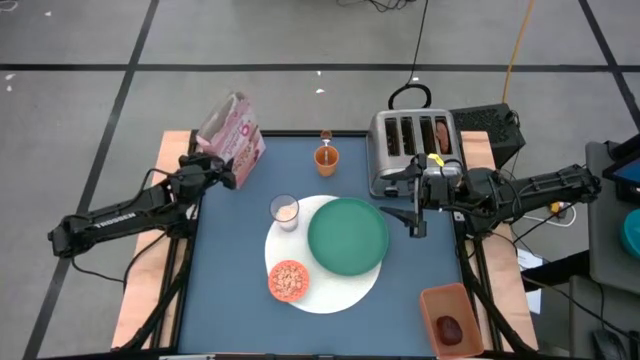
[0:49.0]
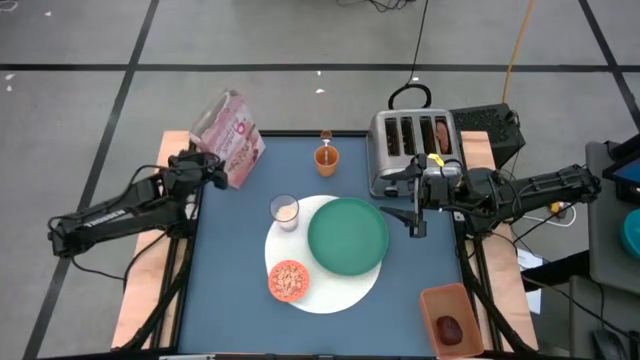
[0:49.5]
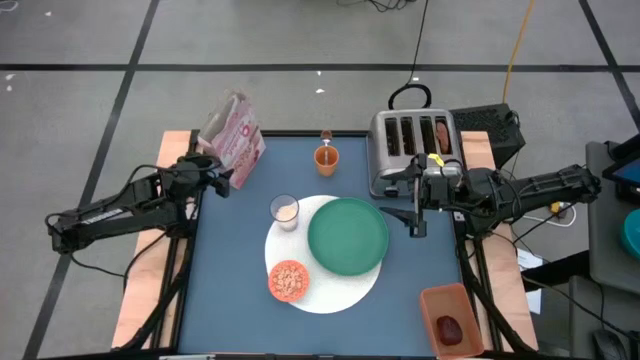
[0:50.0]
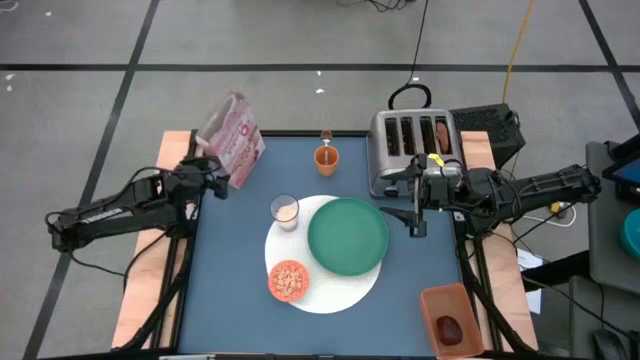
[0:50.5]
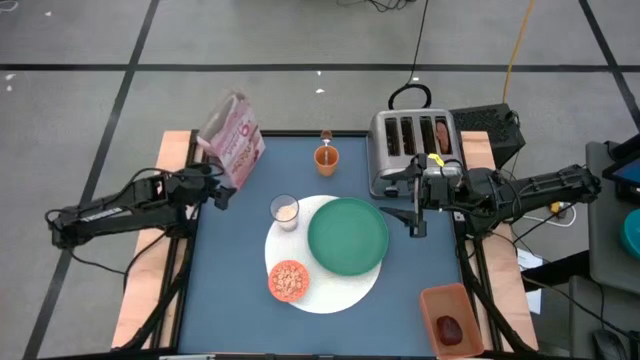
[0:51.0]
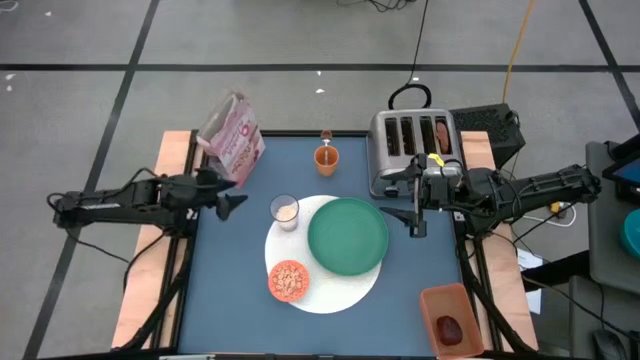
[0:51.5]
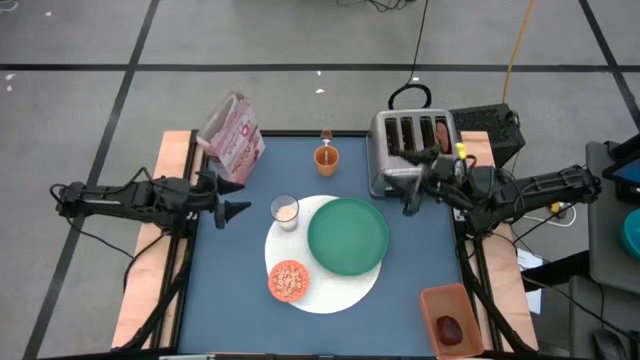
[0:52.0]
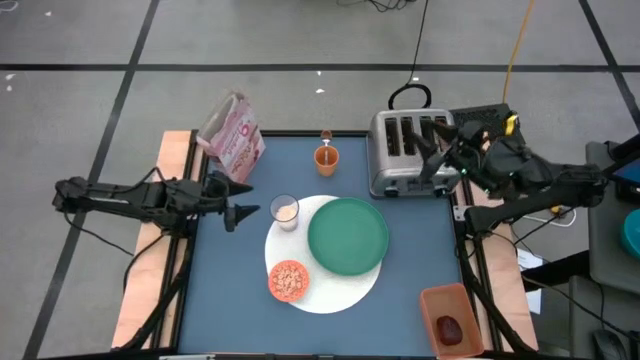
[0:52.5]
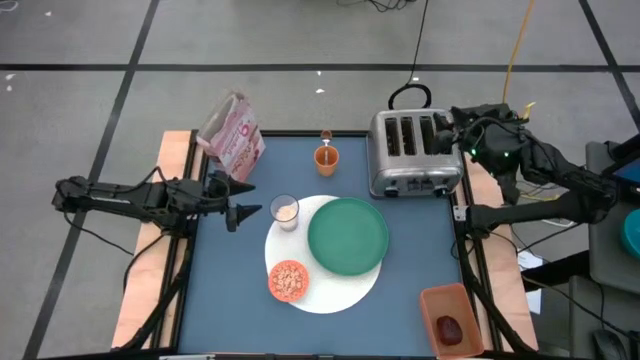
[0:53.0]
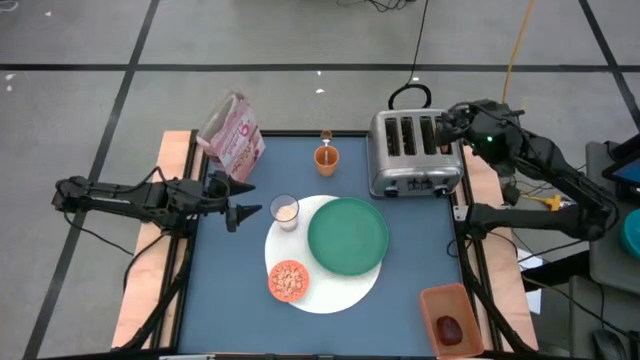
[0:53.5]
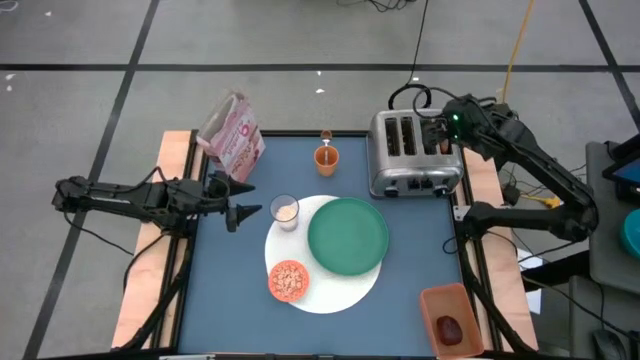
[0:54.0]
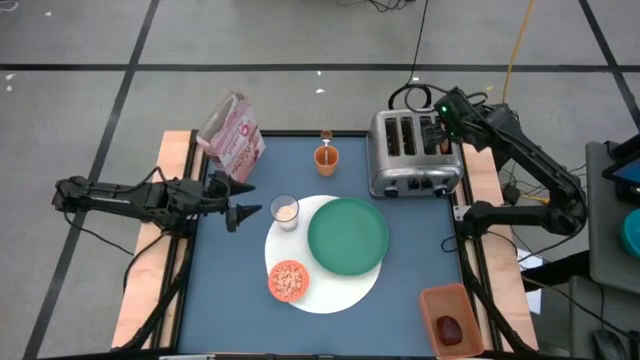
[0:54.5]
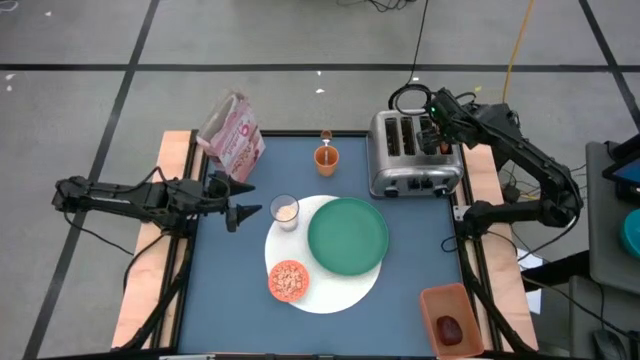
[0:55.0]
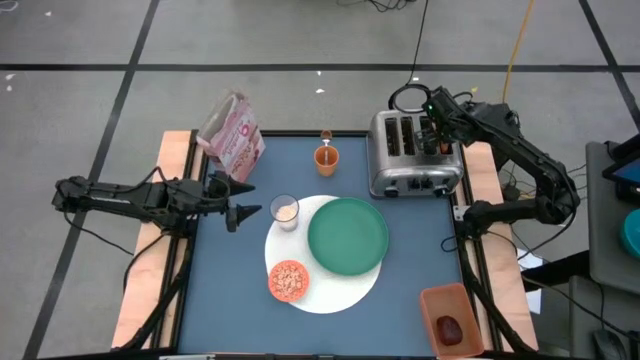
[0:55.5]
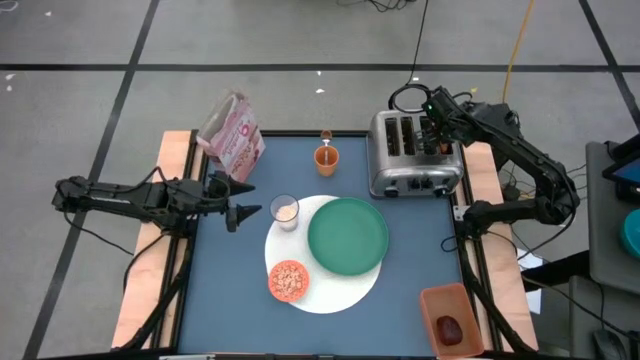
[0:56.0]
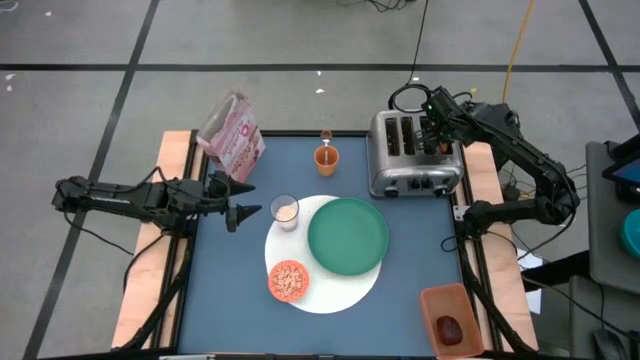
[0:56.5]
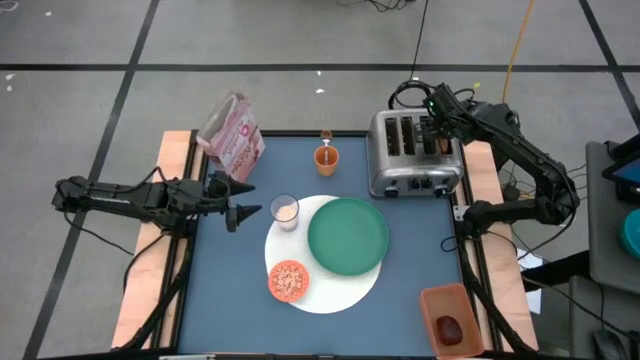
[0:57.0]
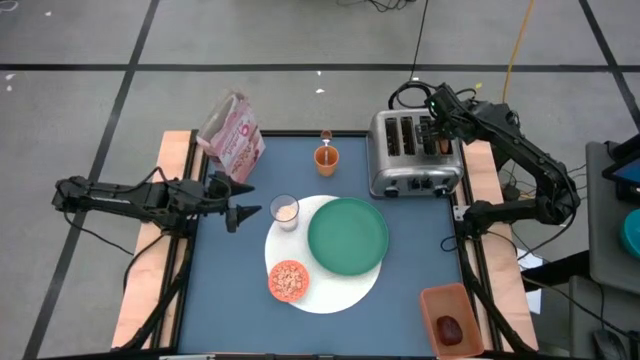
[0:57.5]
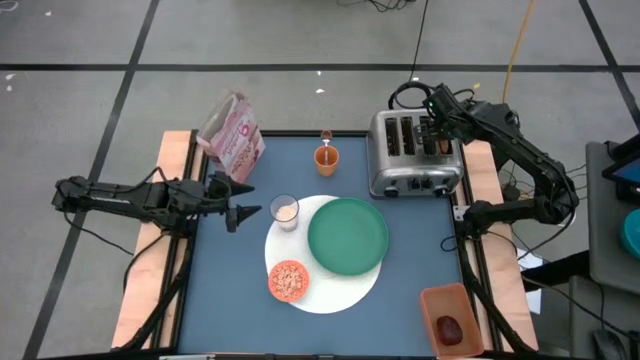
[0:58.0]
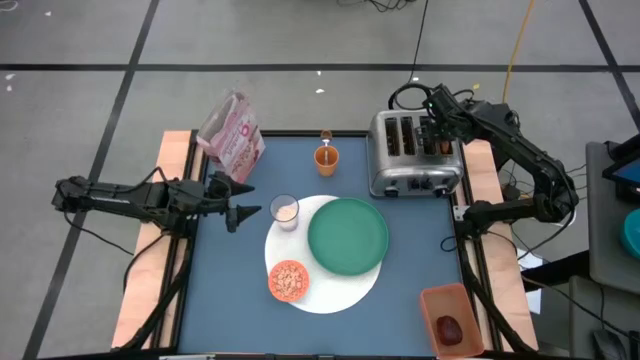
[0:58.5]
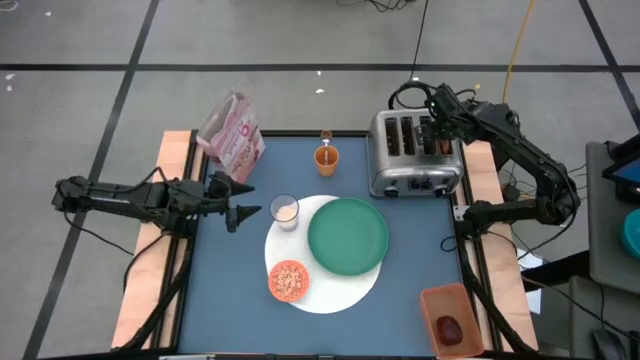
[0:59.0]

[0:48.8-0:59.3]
Task: Arrange a breakfast setting
Put the toasted bagel on the green plate

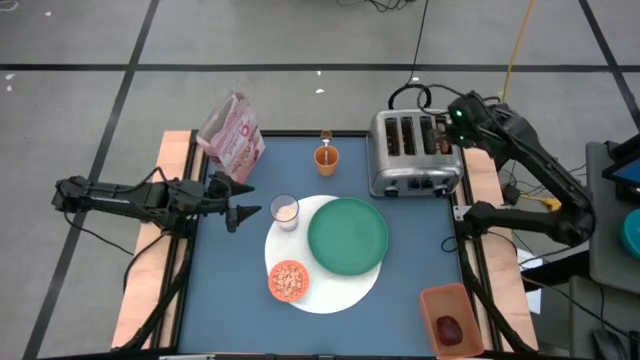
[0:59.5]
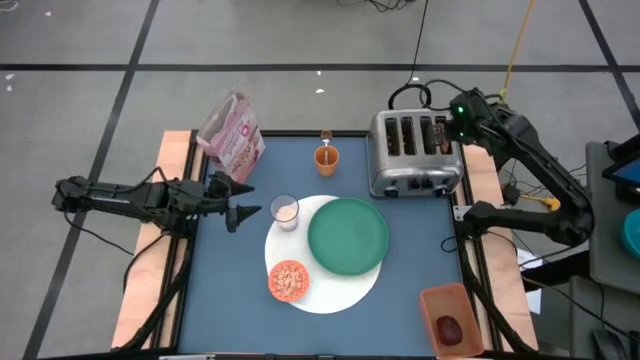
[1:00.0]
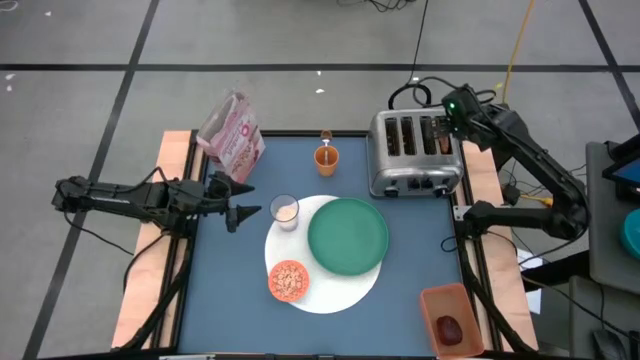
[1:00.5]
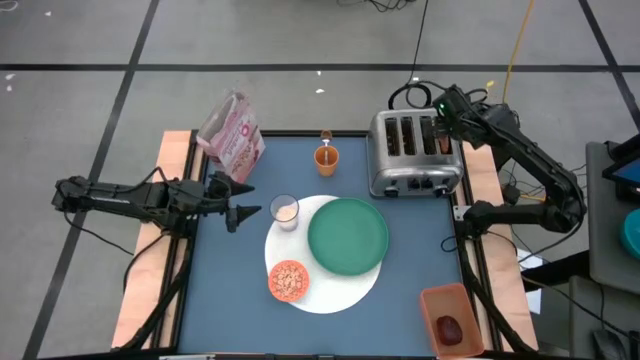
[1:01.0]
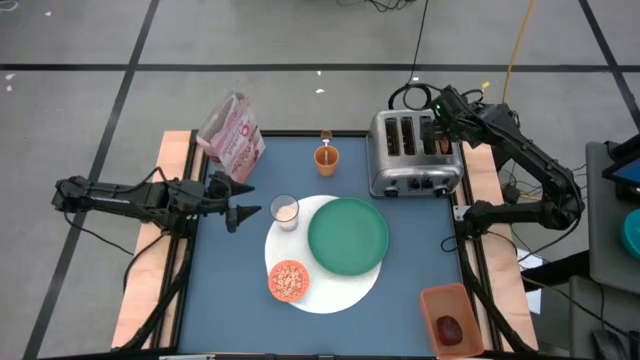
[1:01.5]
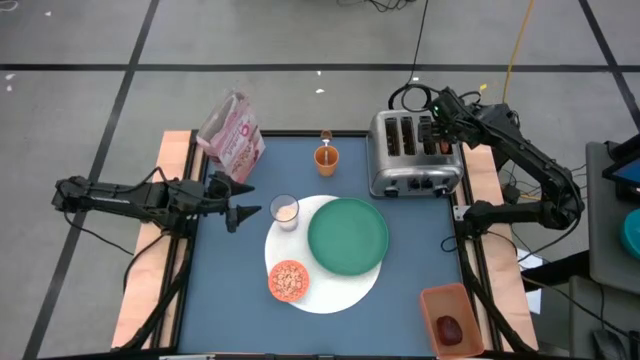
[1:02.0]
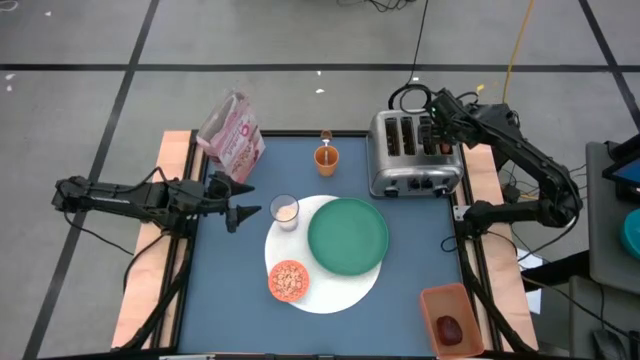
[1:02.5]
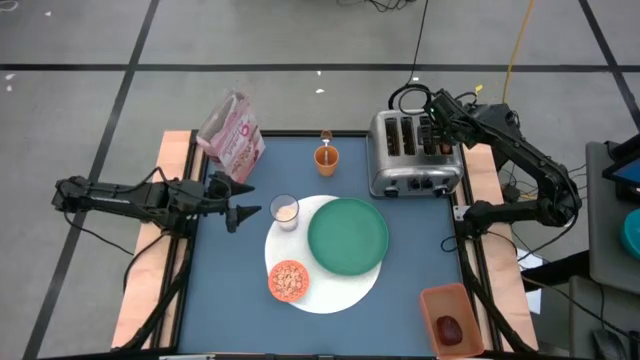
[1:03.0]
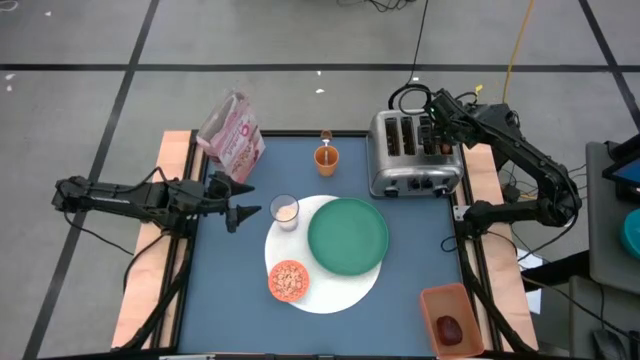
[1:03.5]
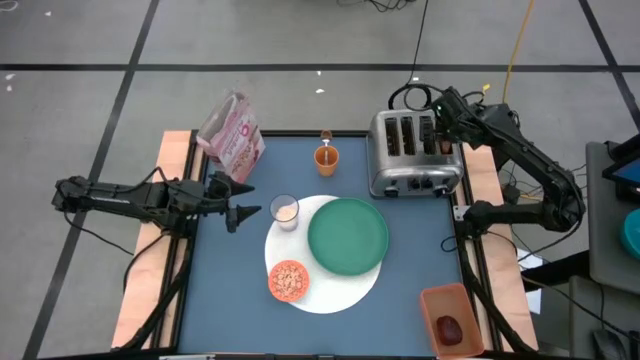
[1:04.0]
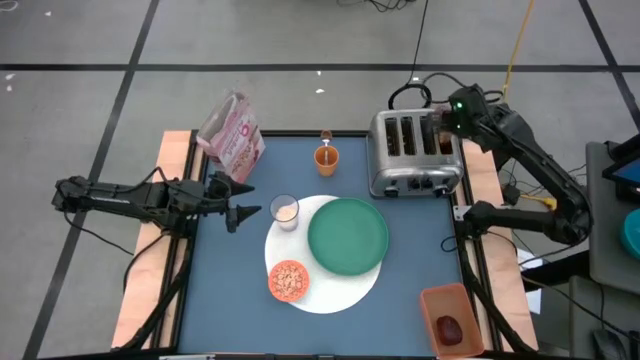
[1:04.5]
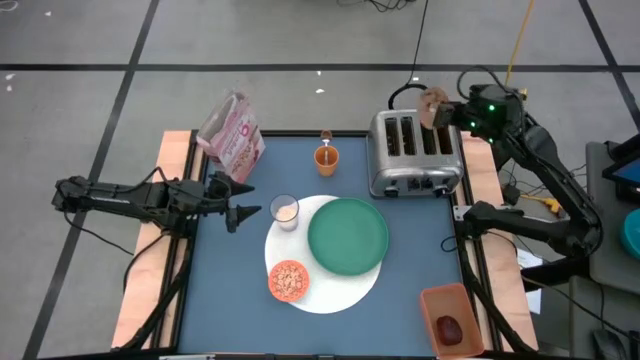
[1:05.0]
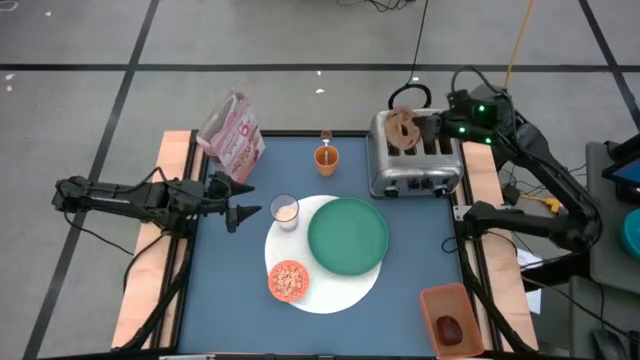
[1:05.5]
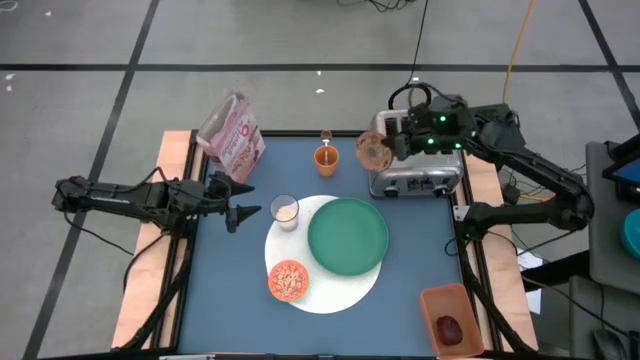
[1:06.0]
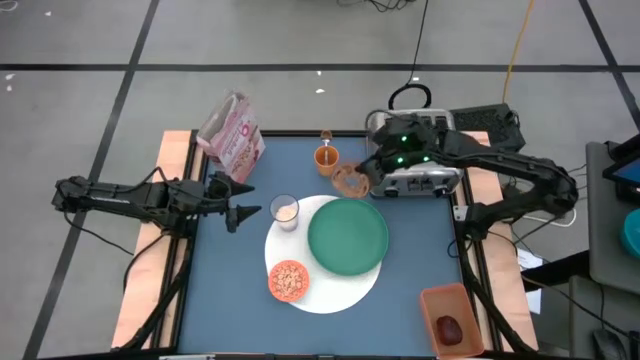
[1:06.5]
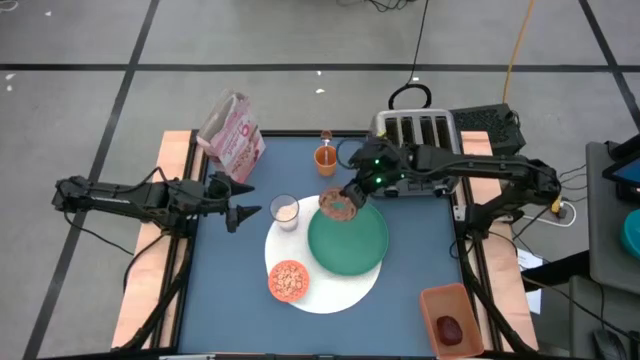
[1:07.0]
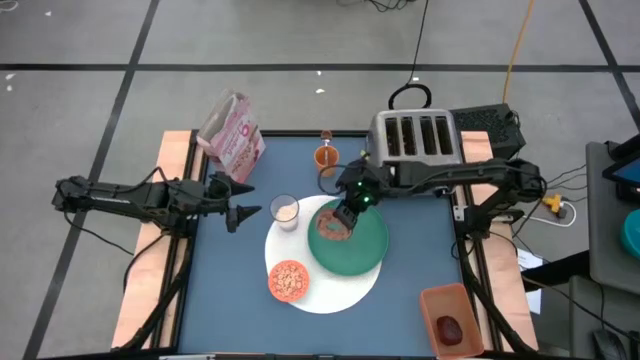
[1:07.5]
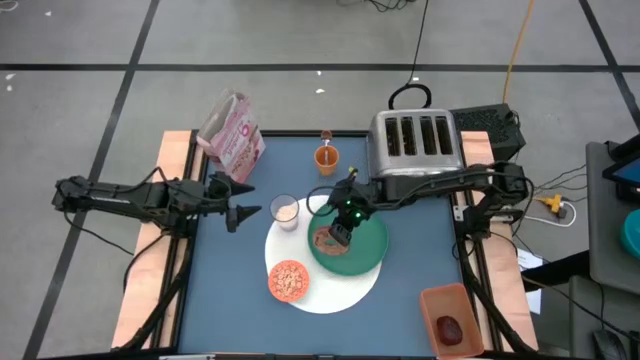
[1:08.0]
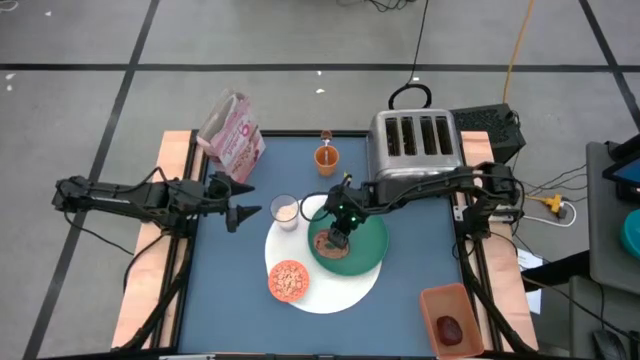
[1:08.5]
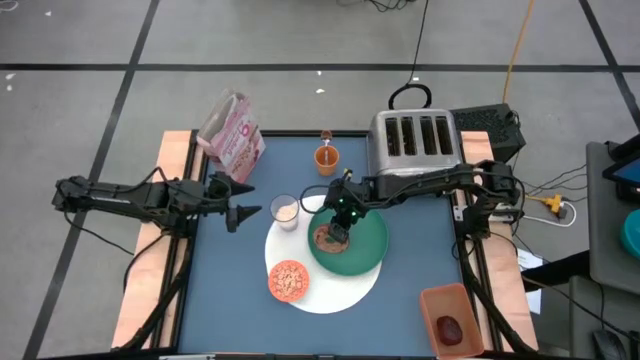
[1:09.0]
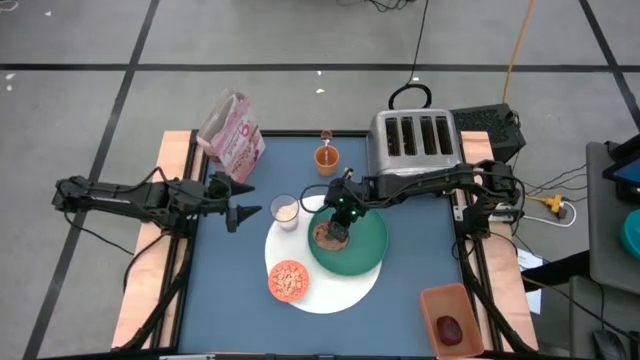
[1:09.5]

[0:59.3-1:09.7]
Put the toasted bagel on the green plate
